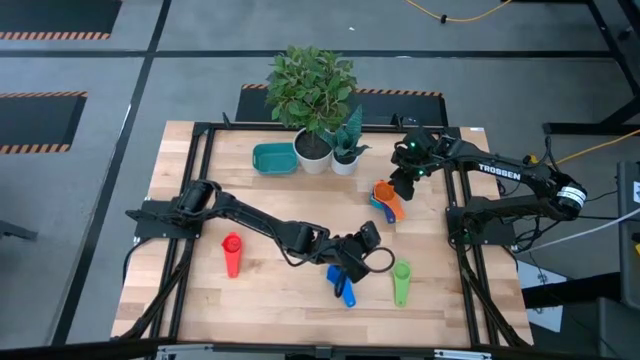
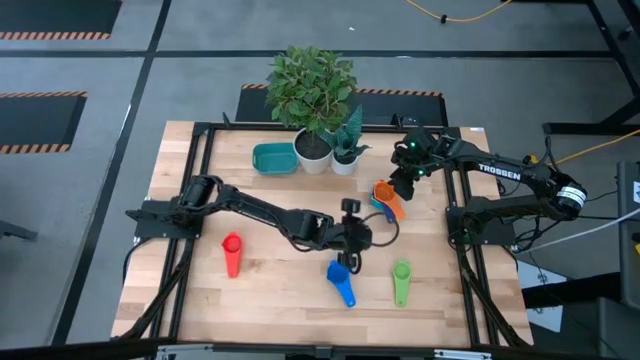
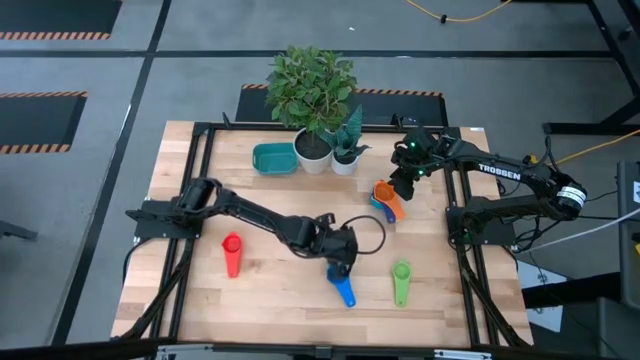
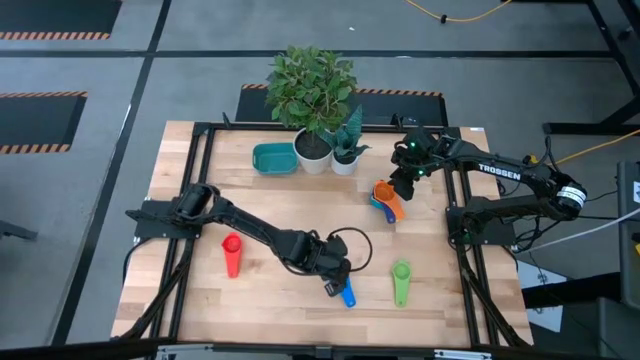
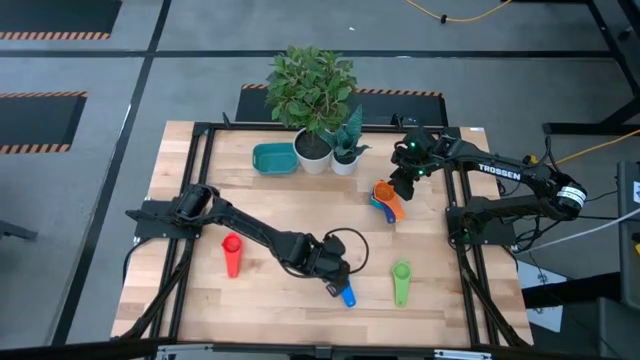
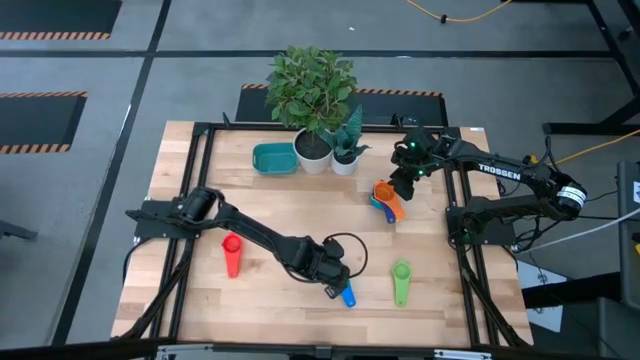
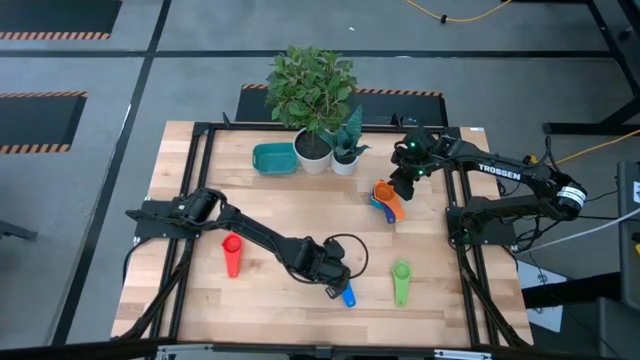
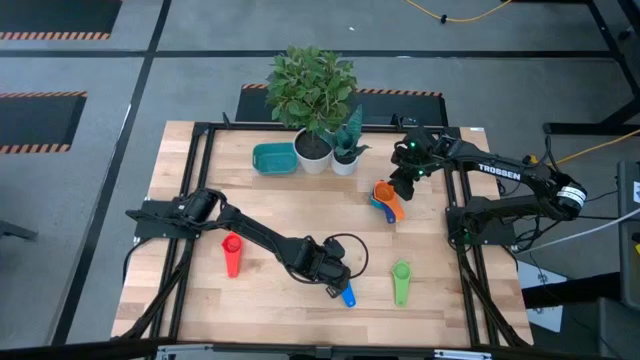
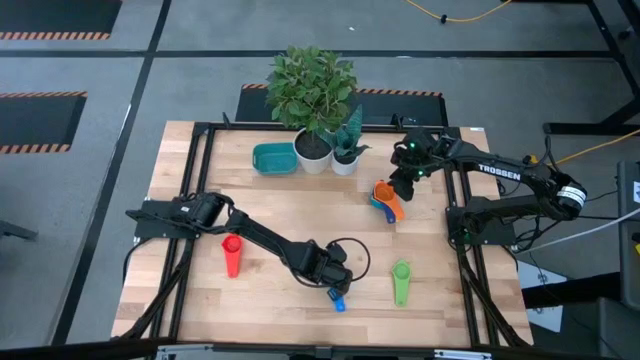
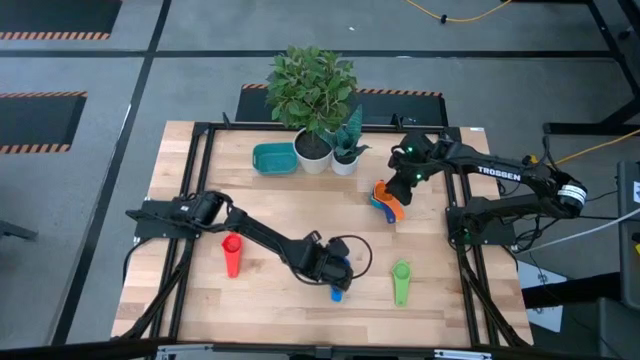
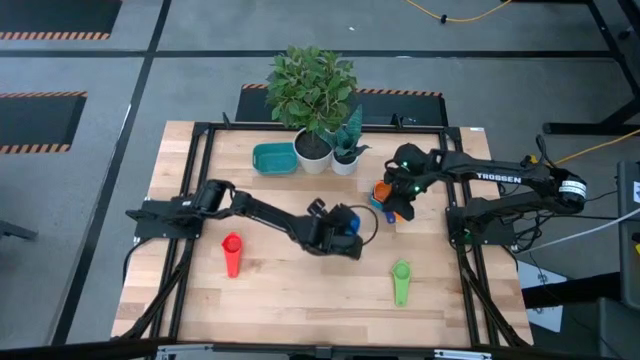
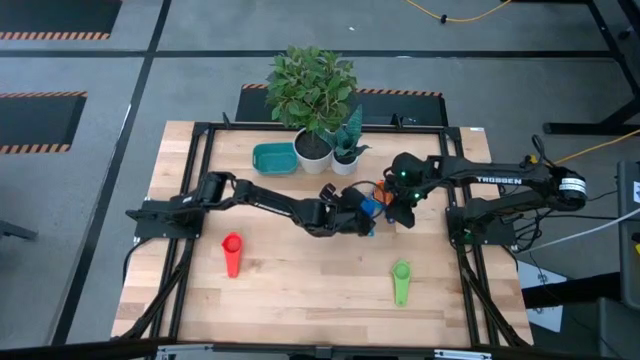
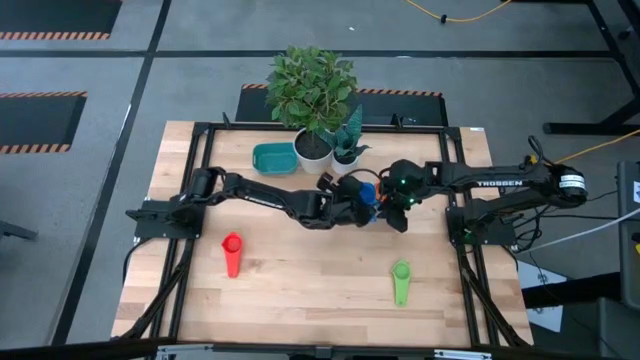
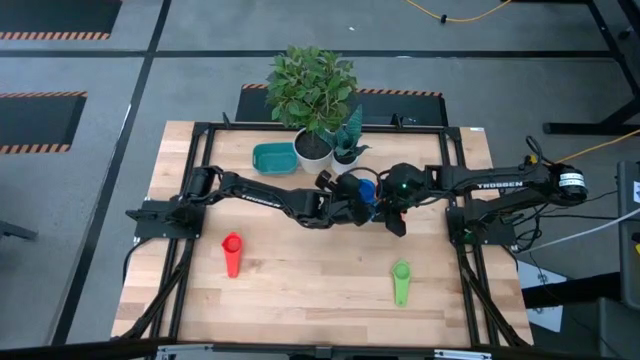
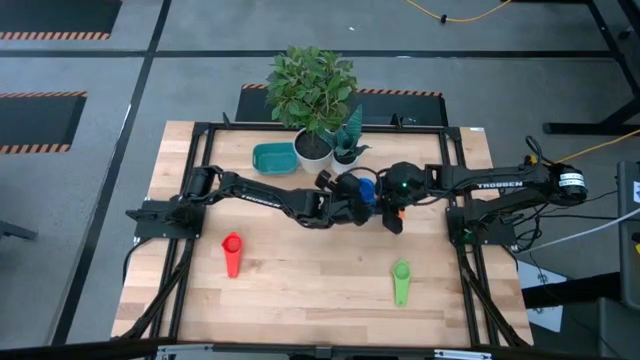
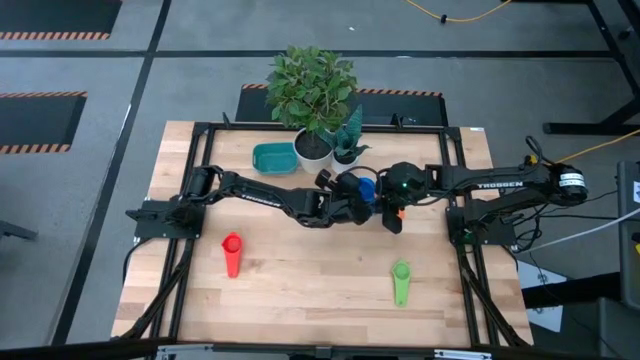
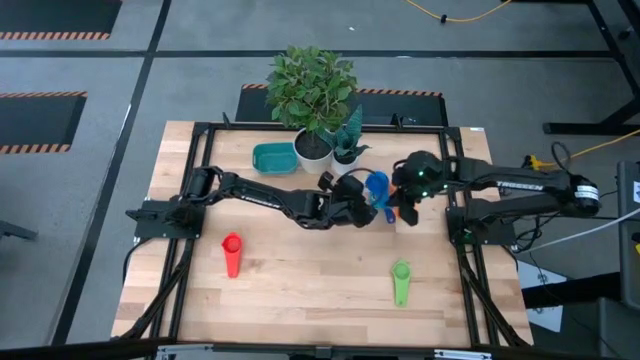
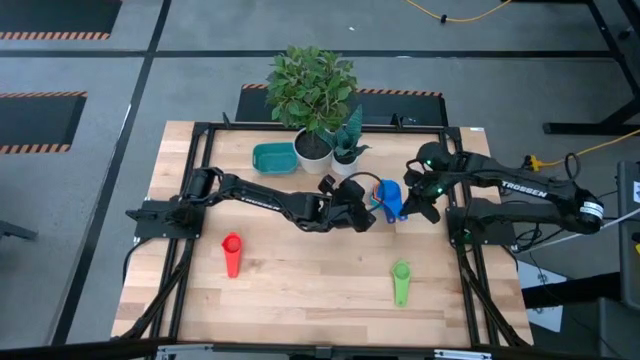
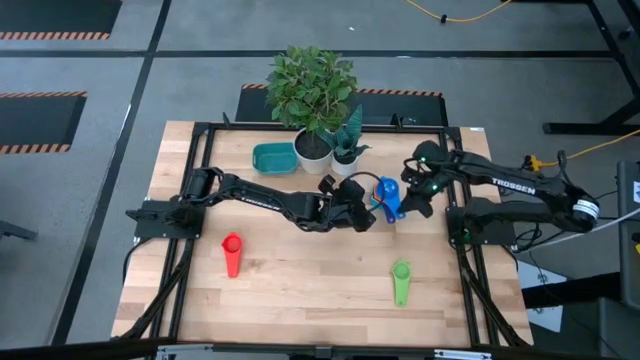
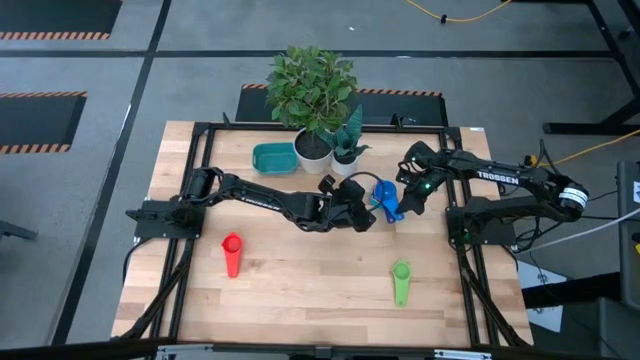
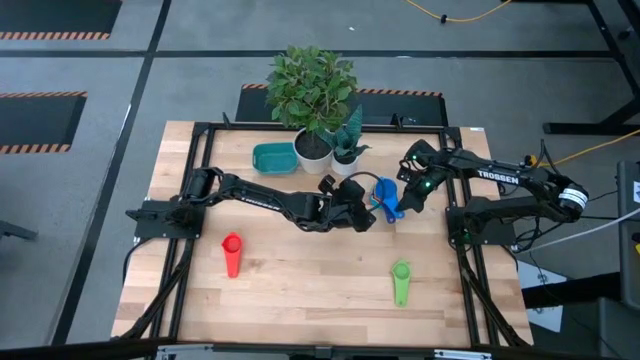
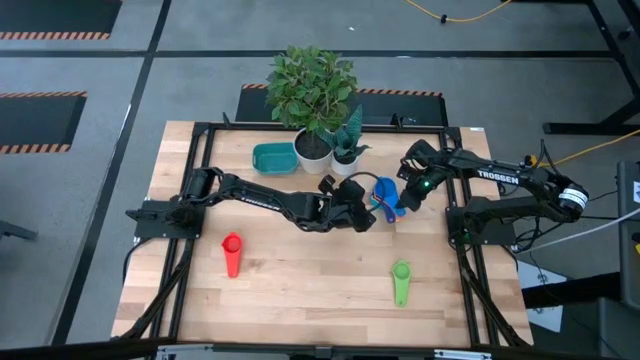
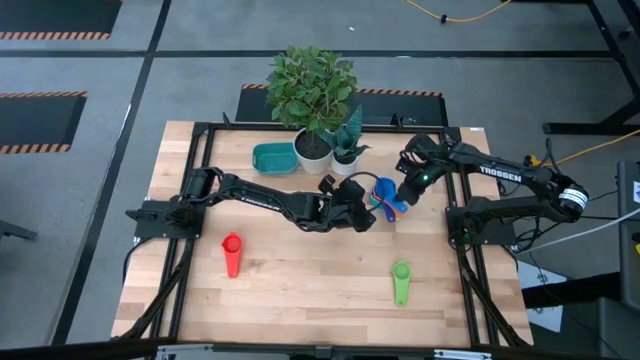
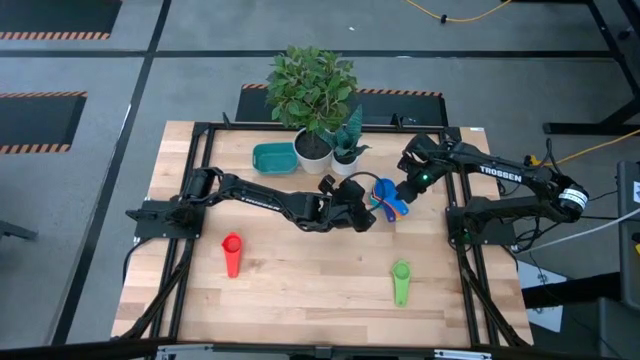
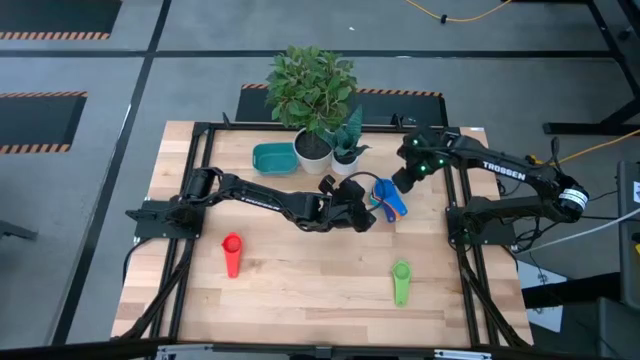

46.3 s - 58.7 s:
Task: Nest measuring cups in basket
Stack the light blue measuring cup on top of the orange measuring cup

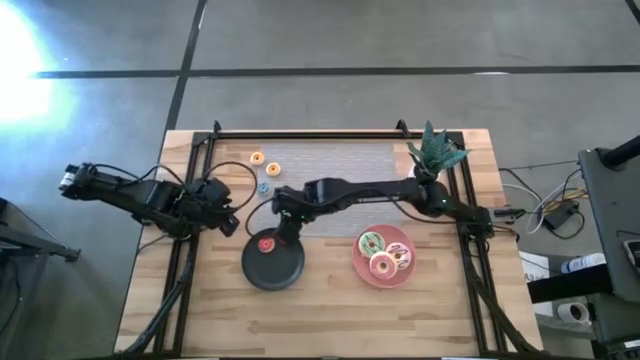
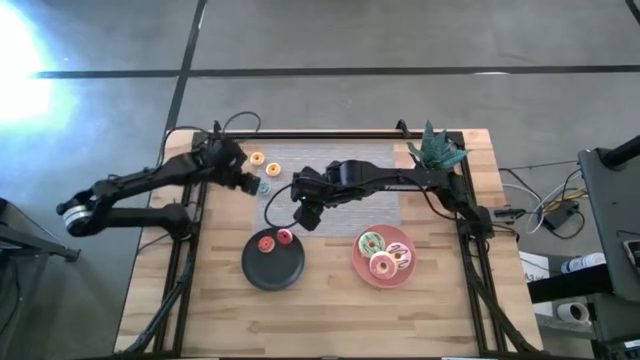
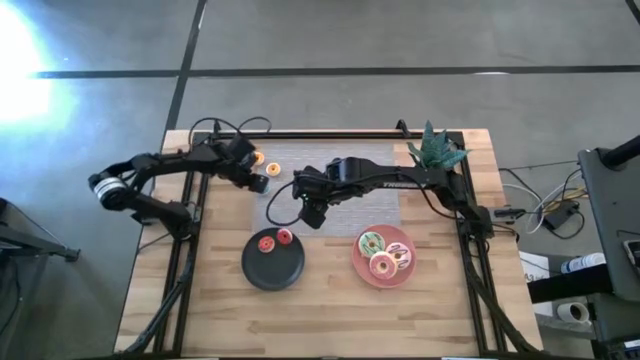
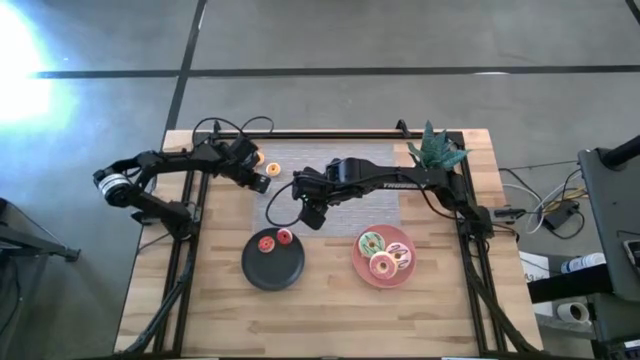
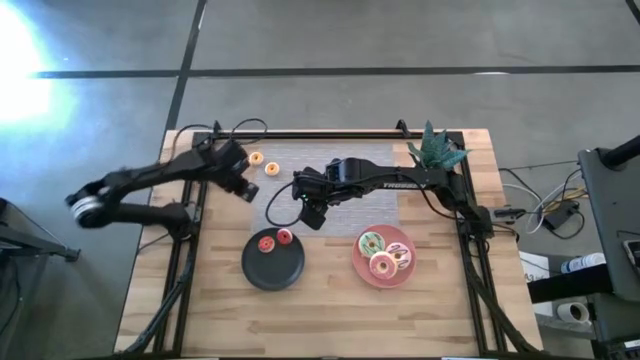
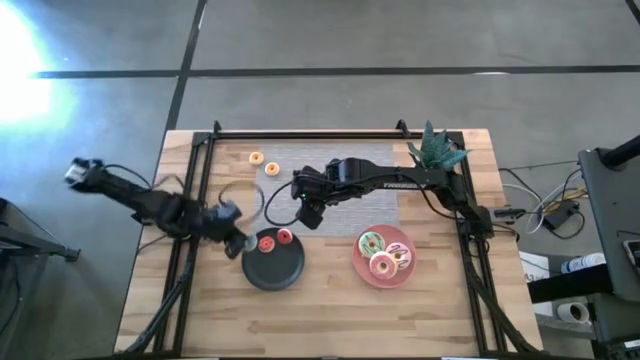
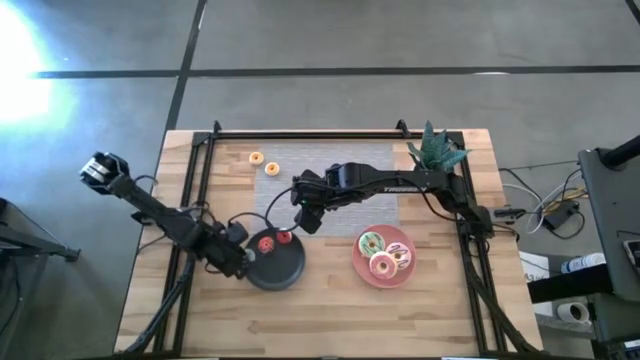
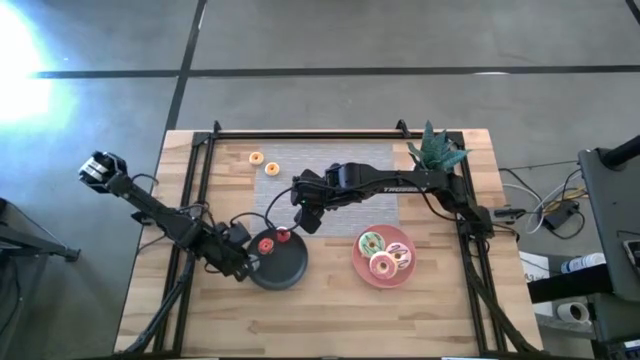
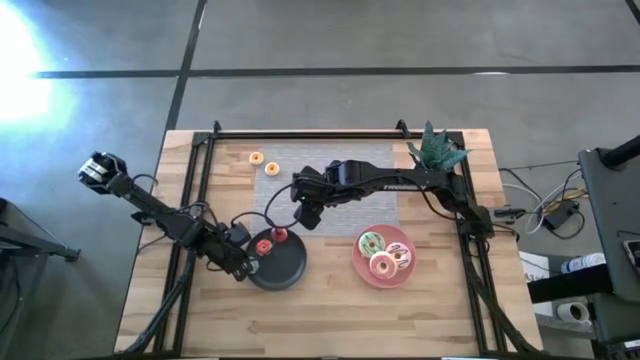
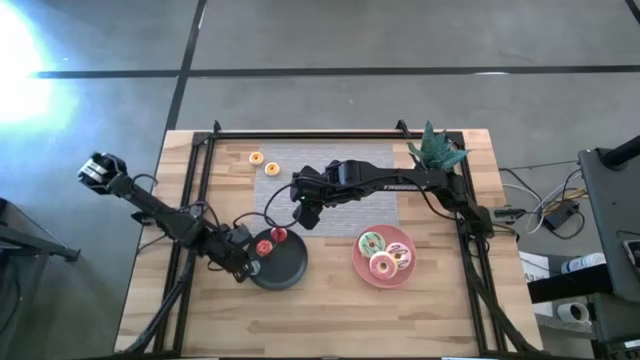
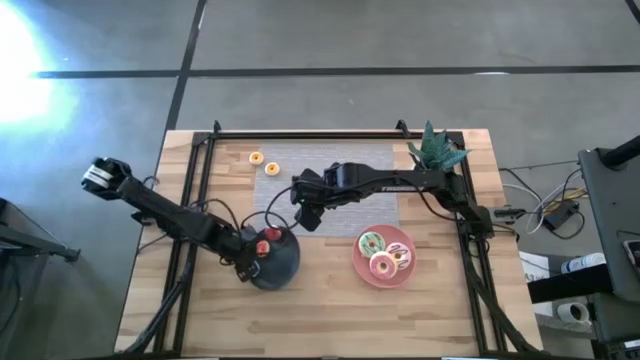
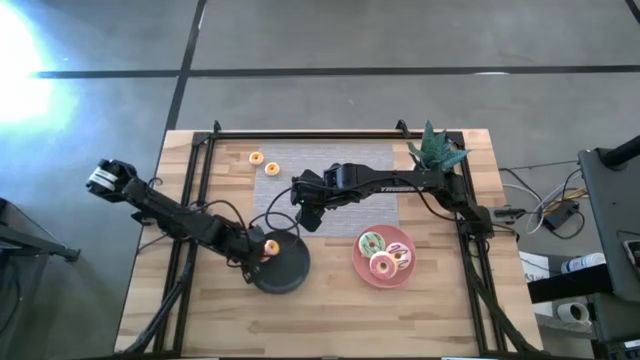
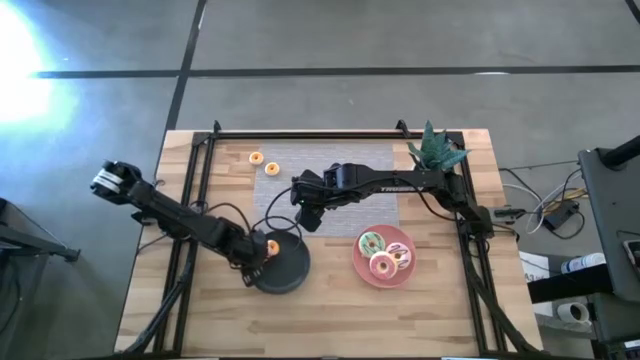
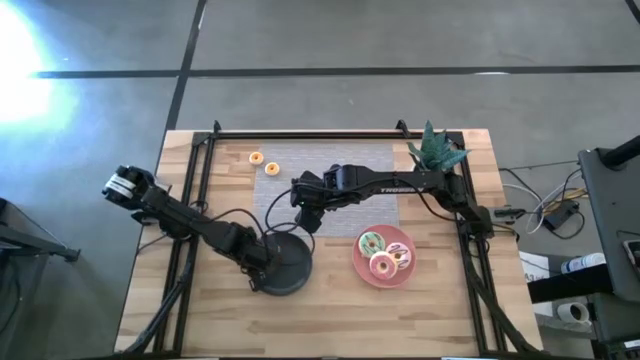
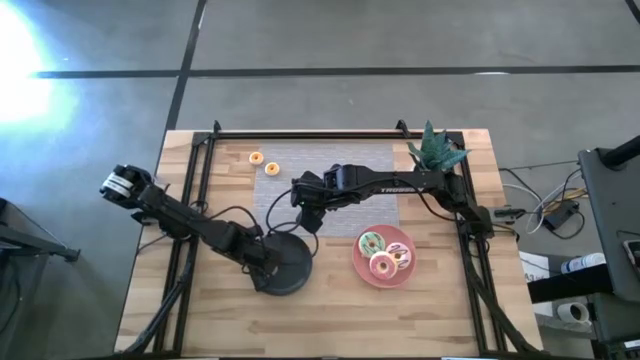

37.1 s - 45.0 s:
Task: Pick & Place donuts
Put the small blue donut on the black plate
